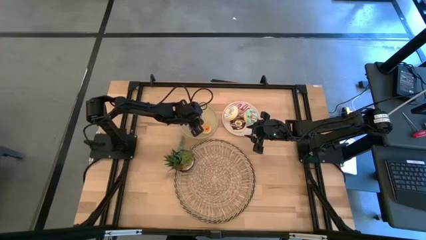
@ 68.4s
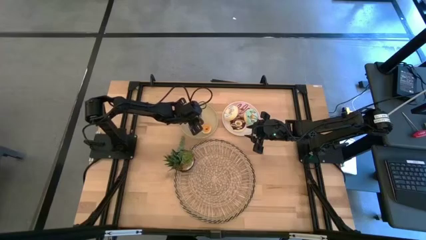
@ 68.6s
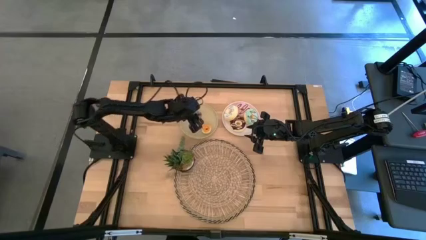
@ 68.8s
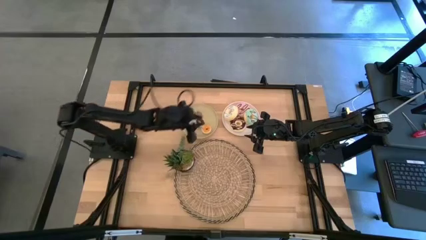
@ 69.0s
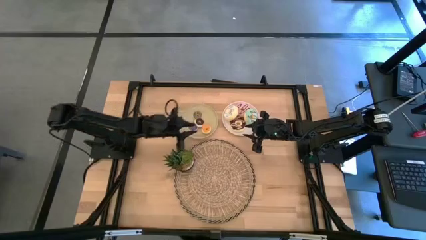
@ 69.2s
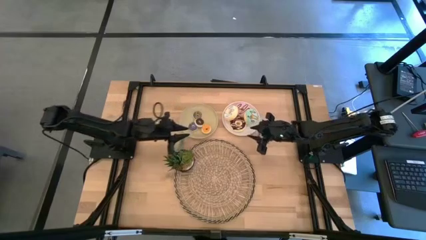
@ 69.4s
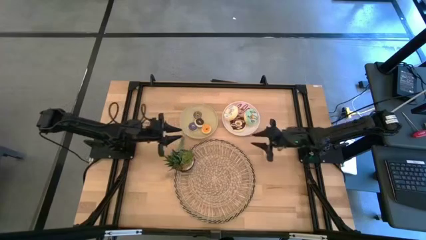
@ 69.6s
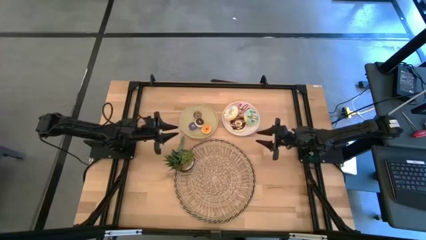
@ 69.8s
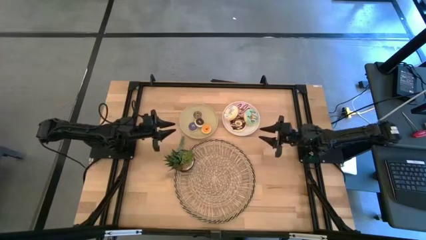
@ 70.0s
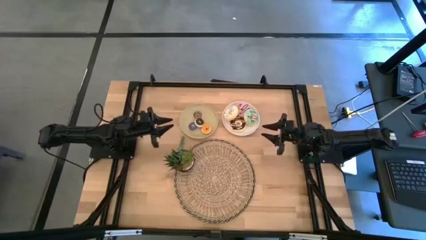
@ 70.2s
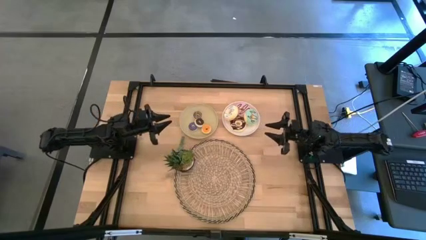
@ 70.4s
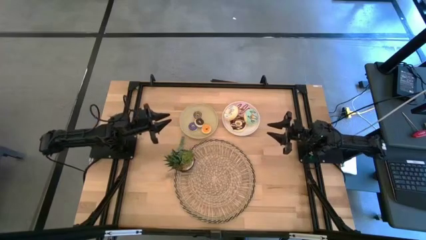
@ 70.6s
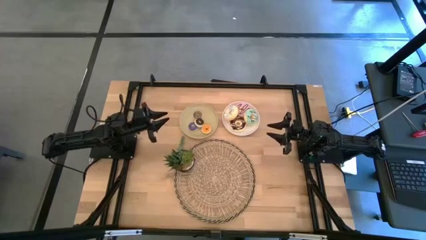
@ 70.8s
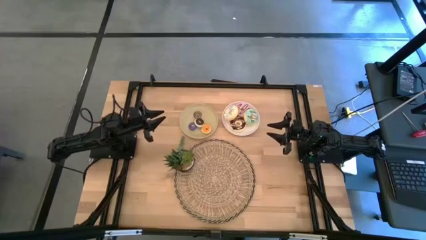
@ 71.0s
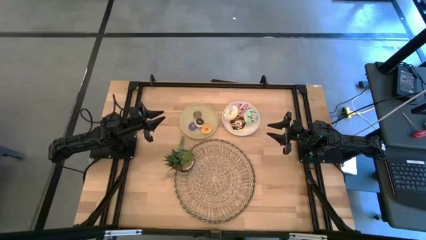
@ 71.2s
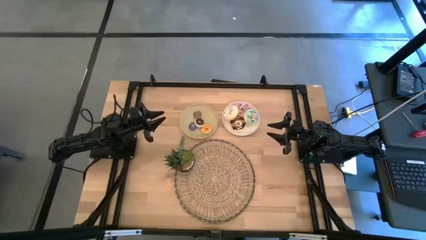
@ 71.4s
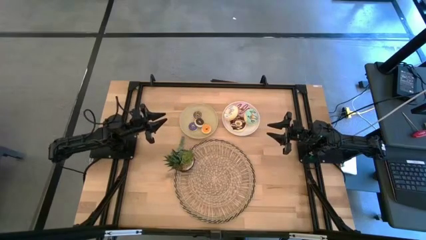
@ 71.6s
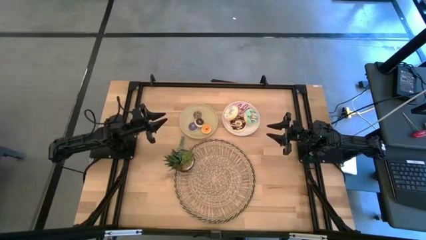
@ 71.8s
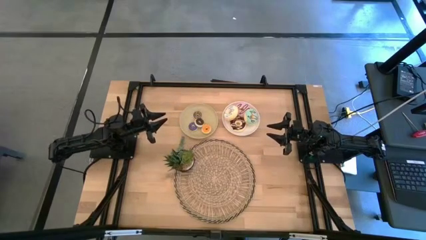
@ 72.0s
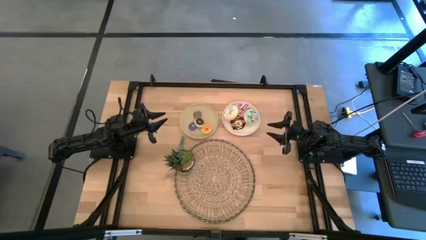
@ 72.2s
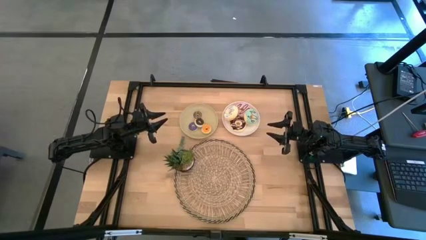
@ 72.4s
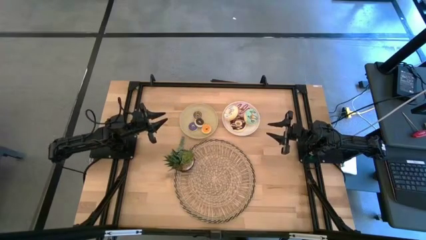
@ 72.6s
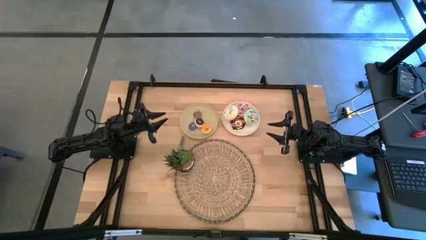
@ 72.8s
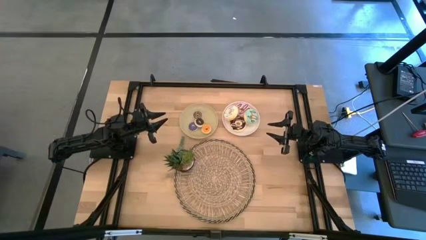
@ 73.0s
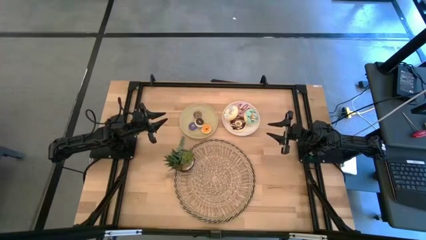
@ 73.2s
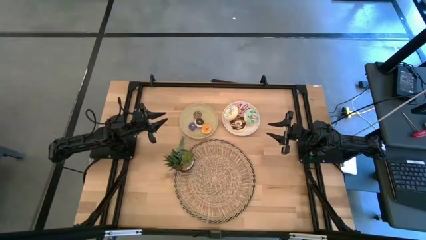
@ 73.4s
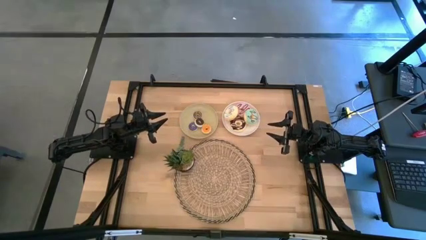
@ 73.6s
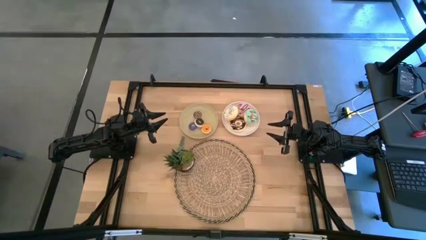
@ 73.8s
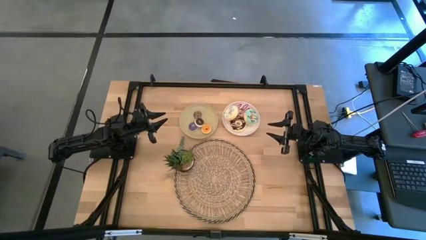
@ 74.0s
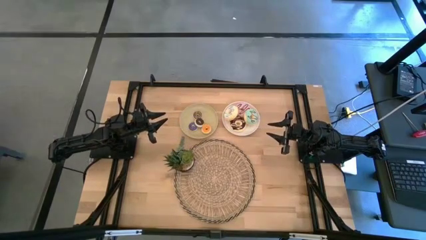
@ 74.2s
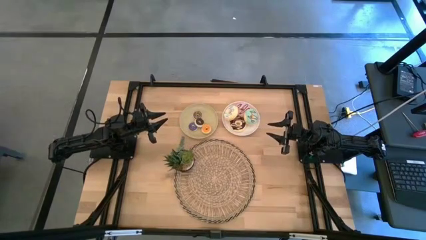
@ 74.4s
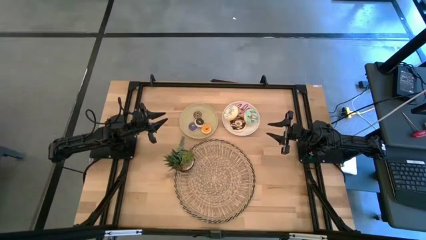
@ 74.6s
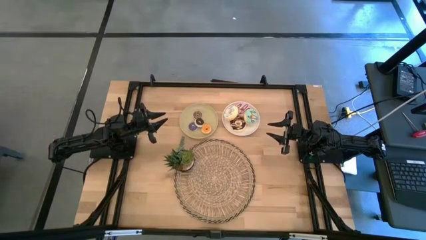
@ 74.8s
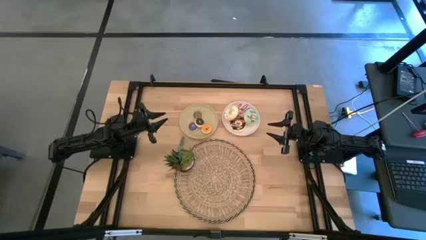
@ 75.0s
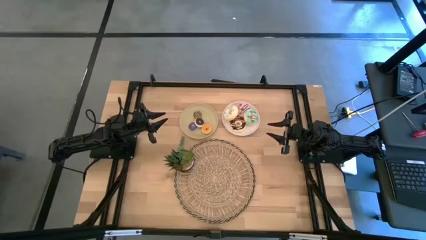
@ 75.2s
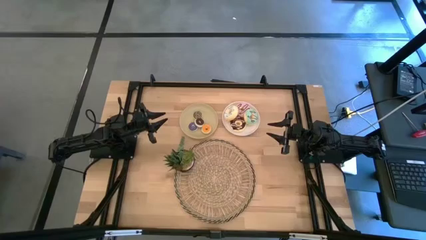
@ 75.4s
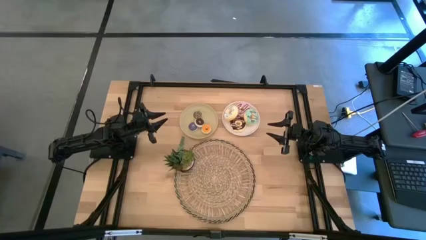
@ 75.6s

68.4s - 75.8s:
Task: Pick & Place donuts
Return to Home Position

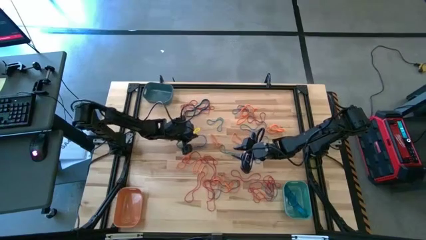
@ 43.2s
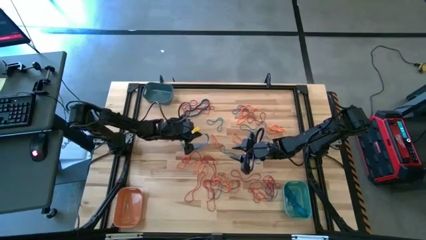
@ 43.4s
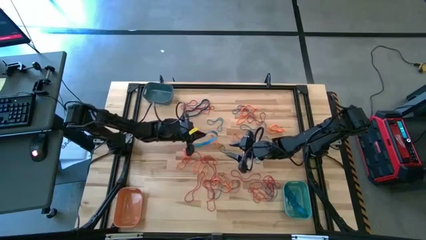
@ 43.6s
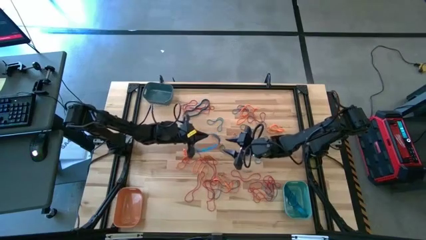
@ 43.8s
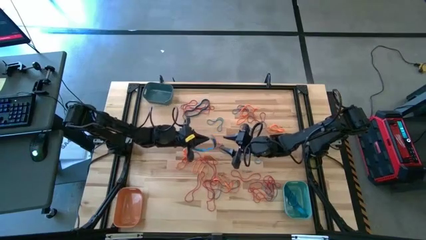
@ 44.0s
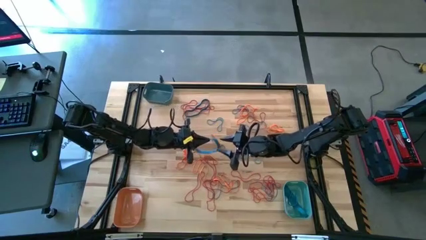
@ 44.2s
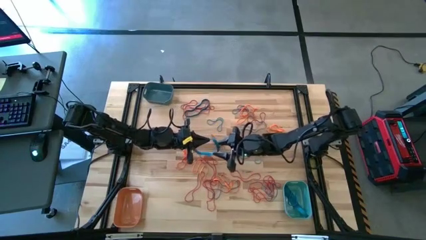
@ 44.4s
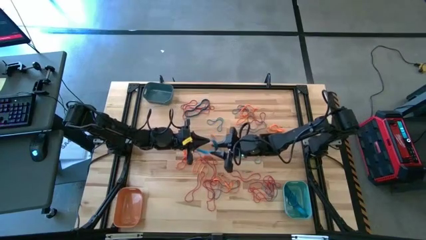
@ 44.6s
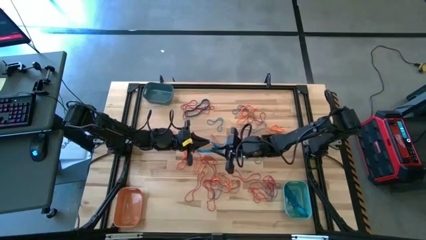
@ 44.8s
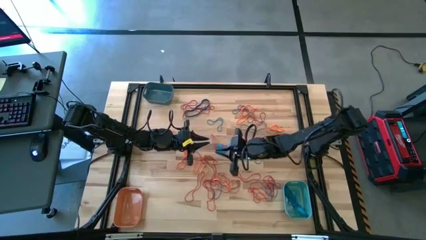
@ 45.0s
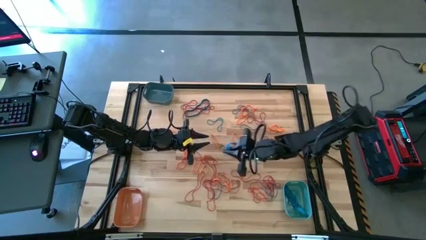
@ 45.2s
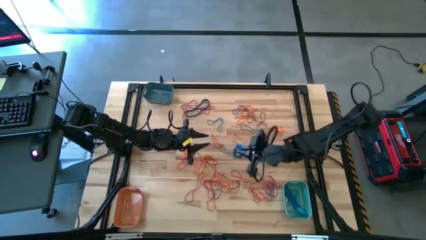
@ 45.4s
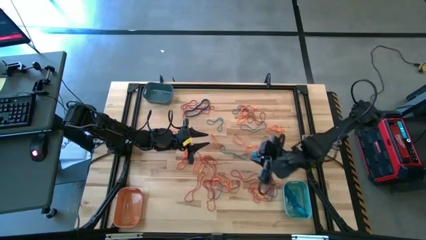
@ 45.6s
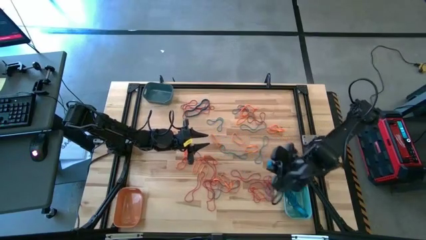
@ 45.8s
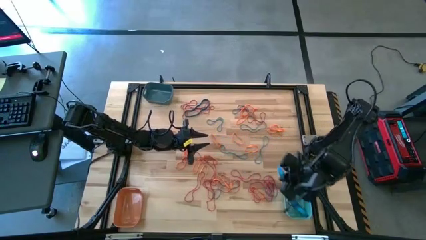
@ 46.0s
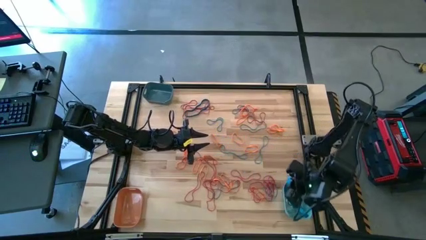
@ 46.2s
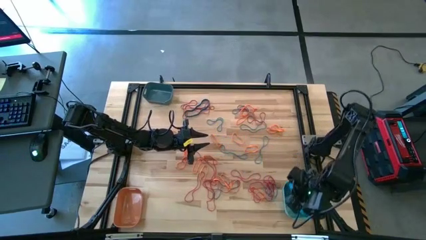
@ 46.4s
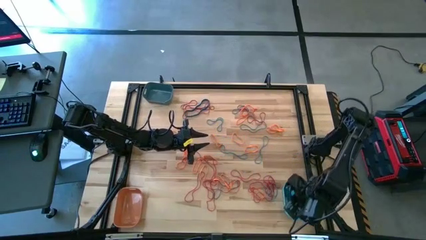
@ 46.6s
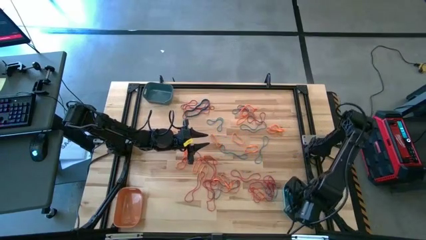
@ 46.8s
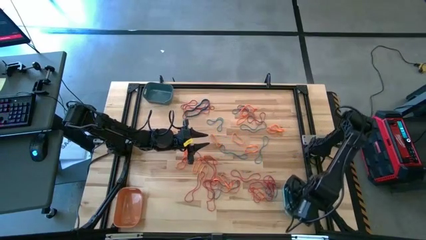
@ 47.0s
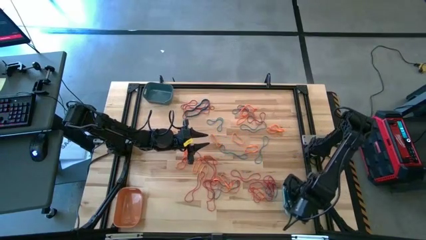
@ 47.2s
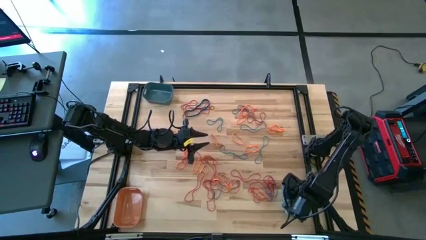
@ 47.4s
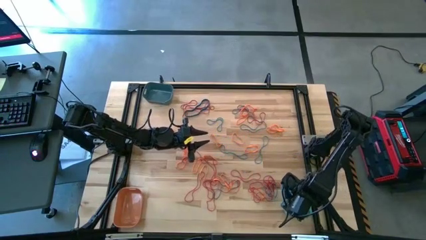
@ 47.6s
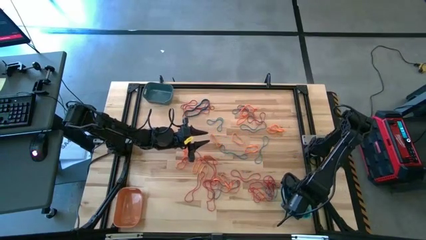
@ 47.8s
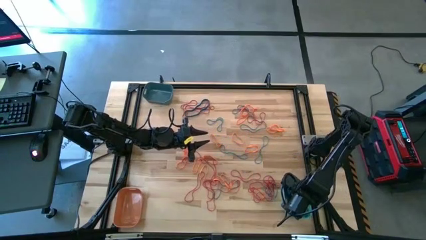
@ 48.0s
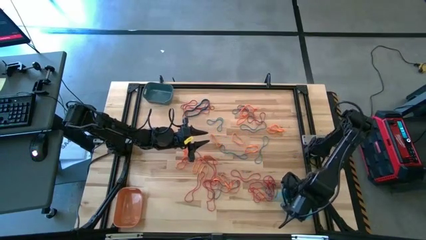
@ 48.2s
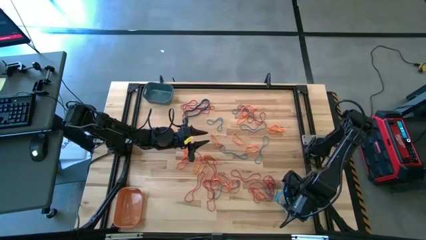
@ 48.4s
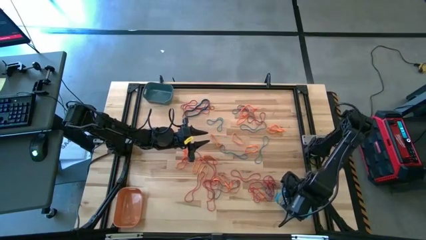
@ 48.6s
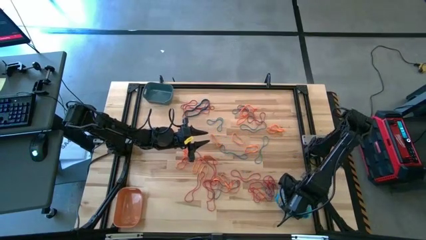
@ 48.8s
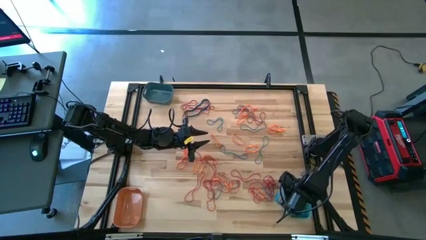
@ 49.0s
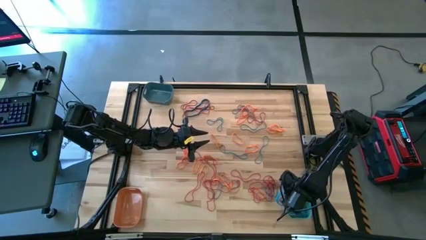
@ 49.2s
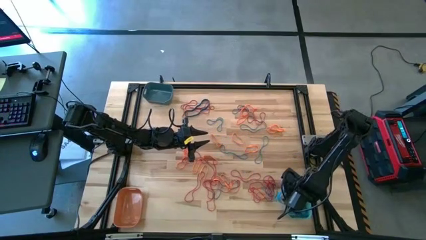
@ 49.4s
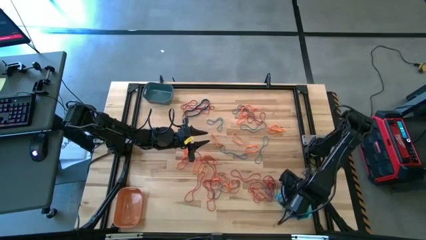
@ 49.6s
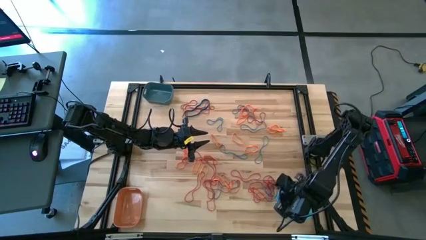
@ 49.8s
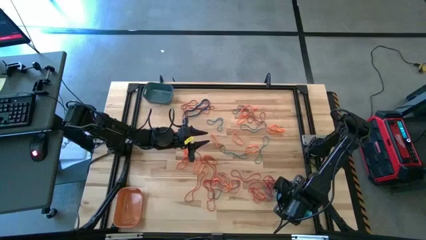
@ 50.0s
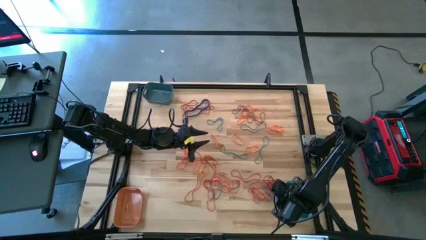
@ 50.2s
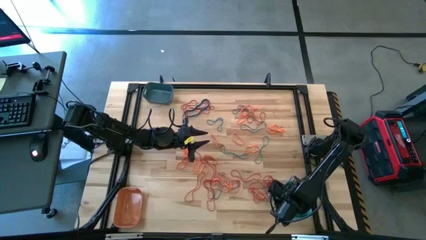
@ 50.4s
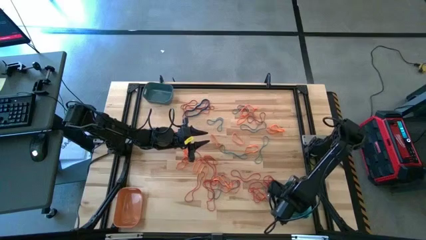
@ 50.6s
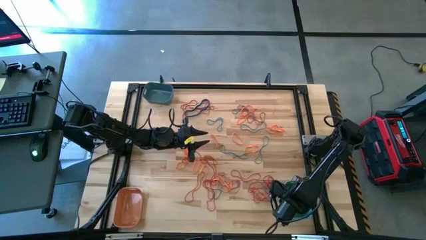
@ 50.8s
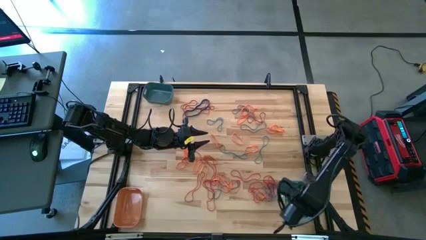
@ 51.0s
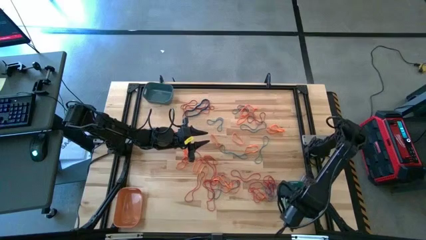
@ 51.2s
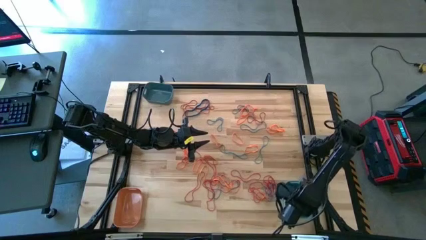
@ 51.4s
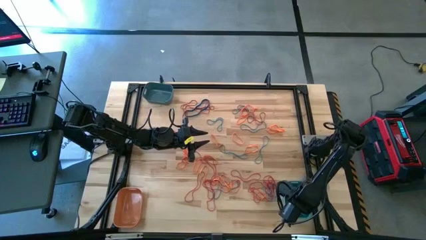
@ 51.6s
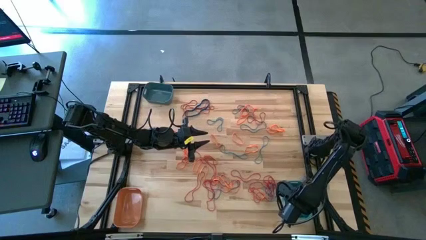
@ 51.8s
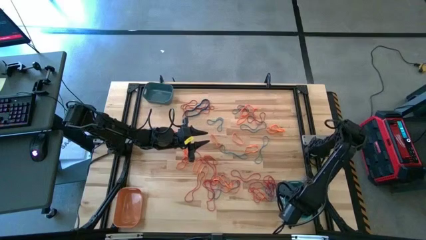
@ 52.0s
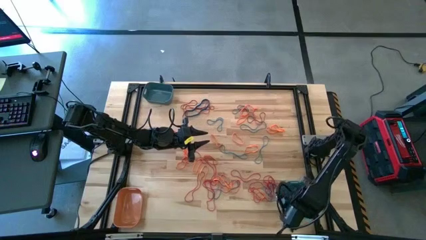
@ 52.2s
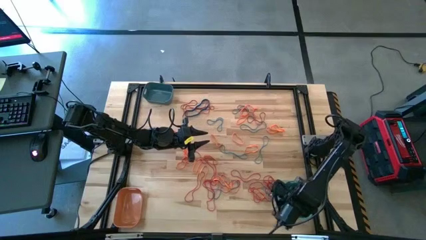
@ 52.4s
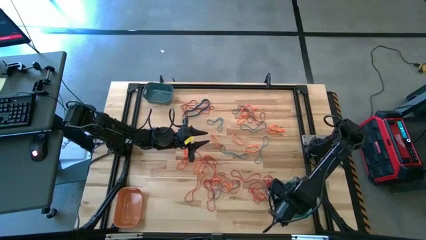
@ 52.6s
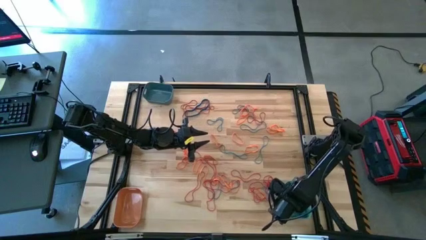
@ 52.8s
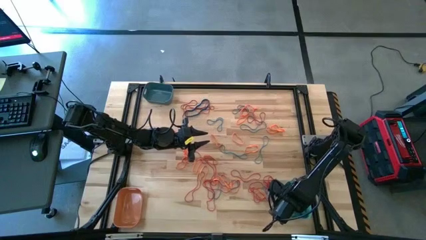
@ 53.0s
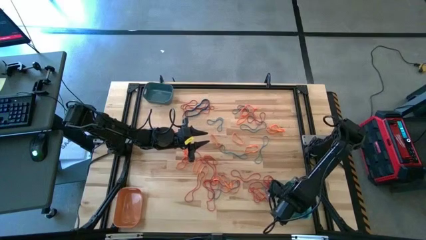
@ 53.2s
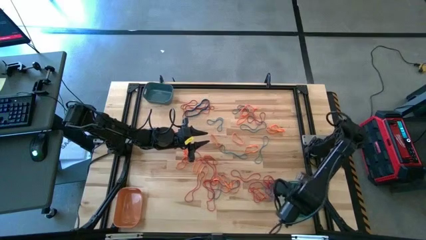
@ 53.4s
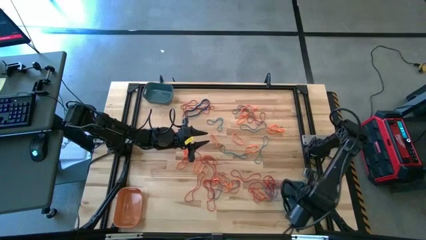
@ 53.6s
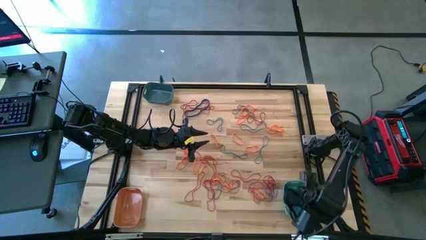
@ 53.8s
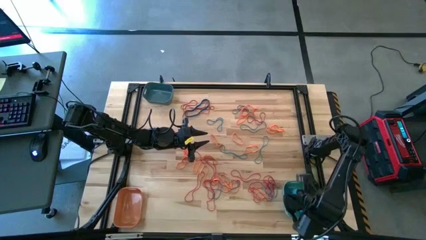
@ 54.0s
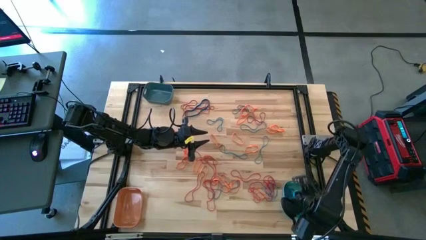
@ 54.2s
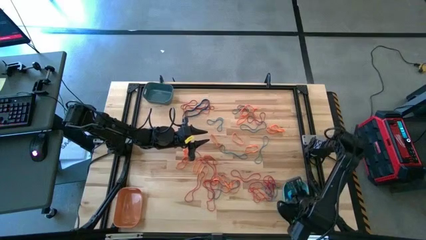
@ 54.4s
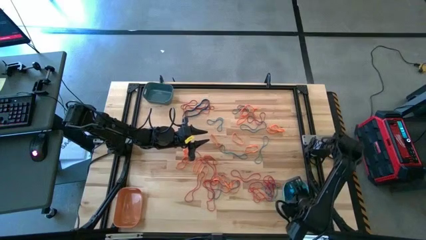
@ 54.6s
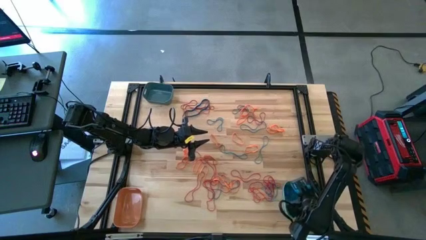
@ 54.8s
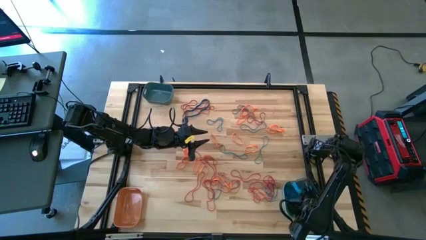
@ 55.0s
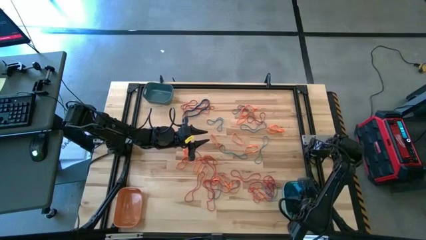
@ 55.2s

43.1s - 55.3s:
Task: Sort rubber bands into baskets
Put the blue rubber band into the light blue bin
